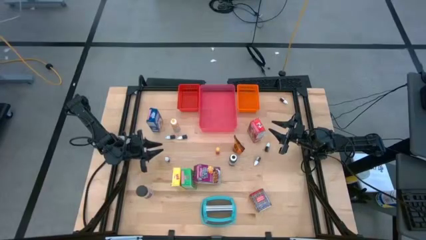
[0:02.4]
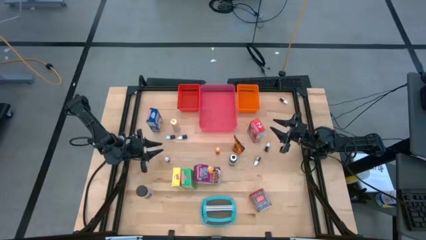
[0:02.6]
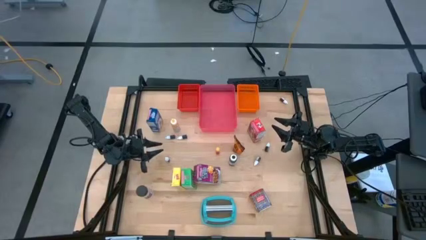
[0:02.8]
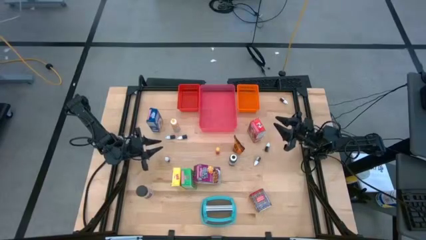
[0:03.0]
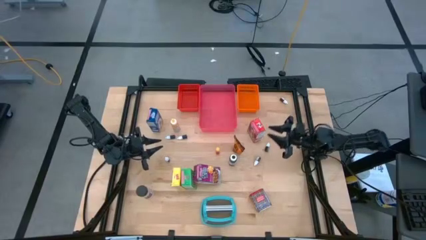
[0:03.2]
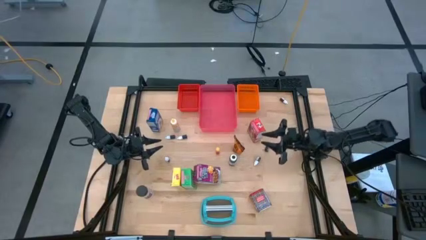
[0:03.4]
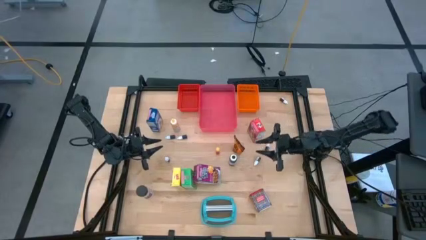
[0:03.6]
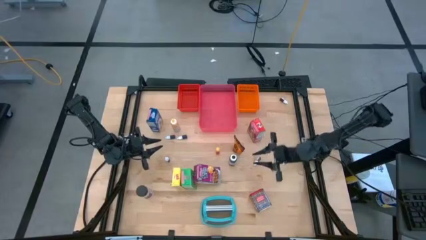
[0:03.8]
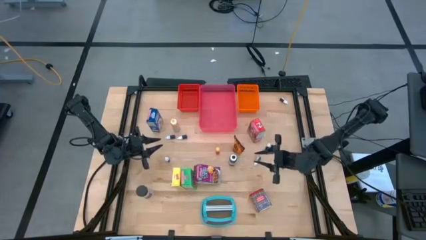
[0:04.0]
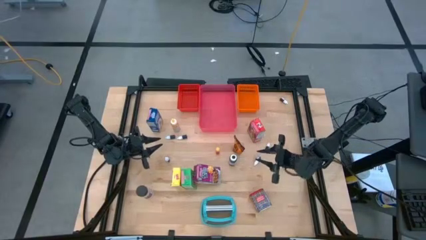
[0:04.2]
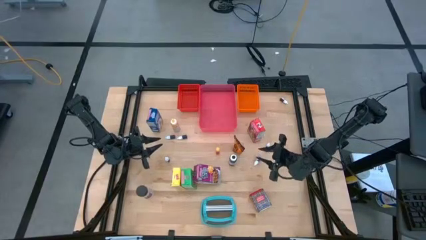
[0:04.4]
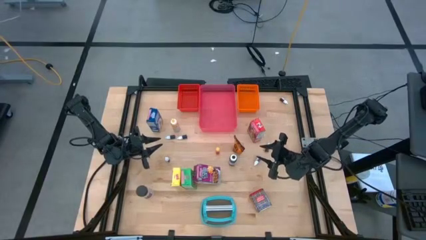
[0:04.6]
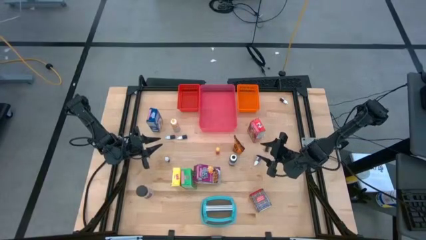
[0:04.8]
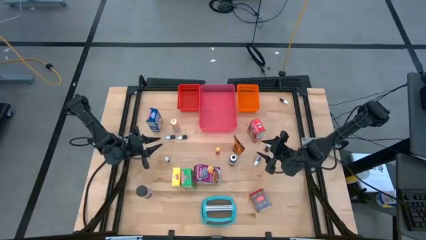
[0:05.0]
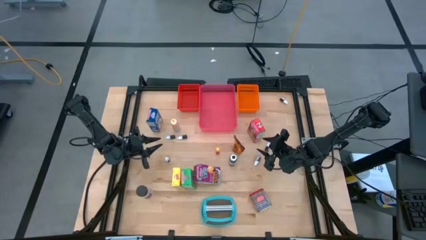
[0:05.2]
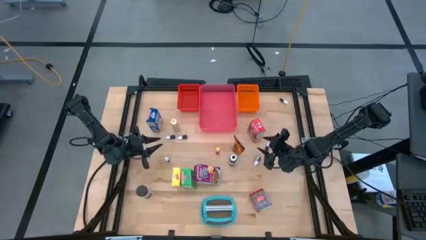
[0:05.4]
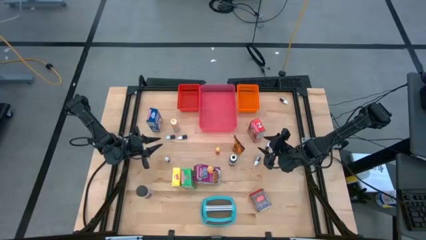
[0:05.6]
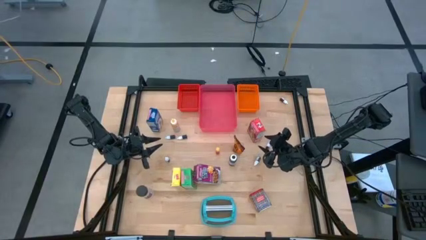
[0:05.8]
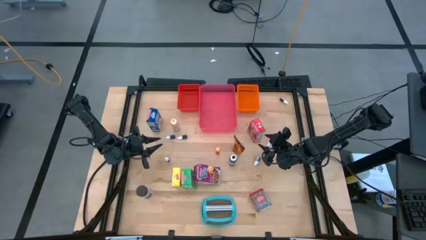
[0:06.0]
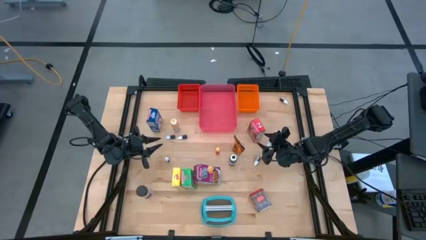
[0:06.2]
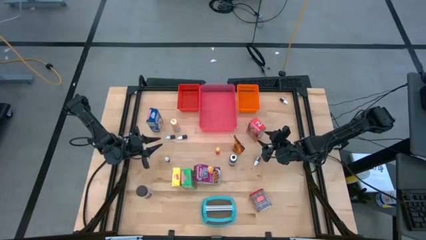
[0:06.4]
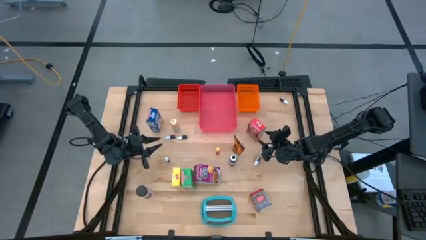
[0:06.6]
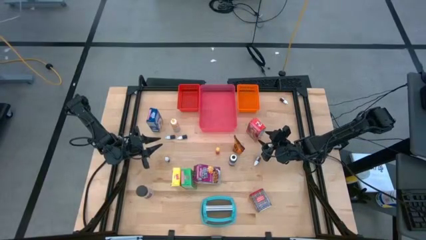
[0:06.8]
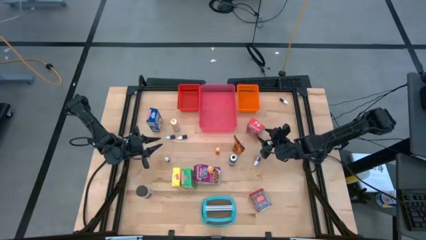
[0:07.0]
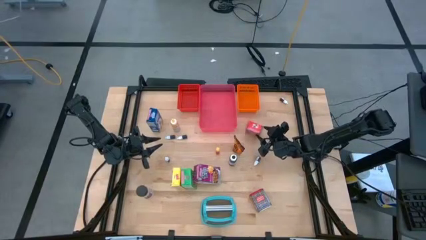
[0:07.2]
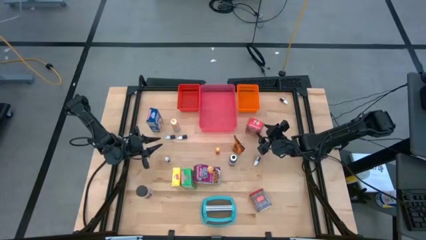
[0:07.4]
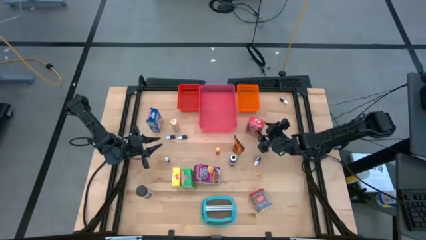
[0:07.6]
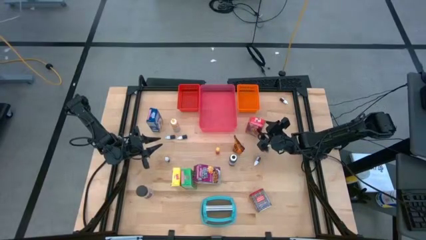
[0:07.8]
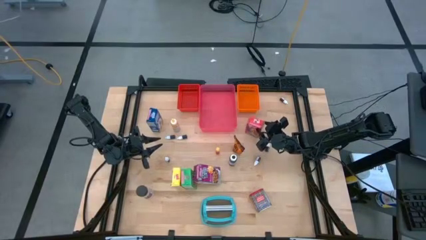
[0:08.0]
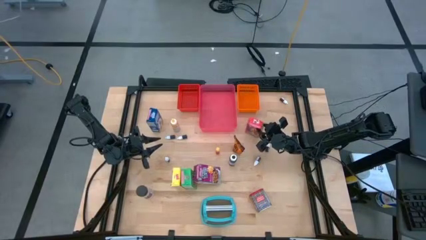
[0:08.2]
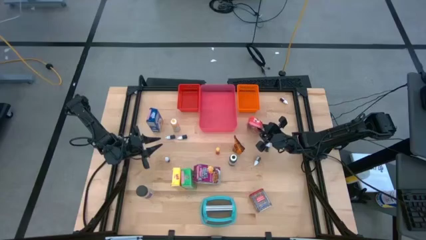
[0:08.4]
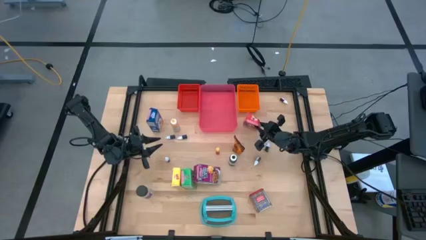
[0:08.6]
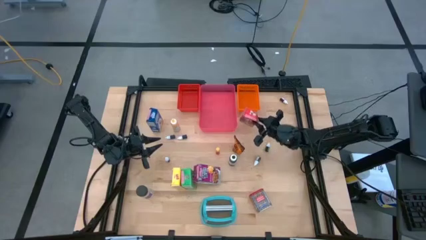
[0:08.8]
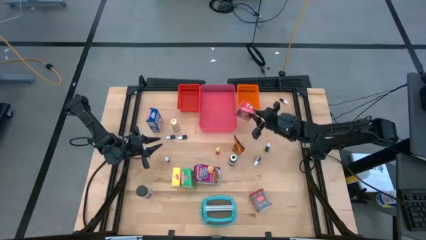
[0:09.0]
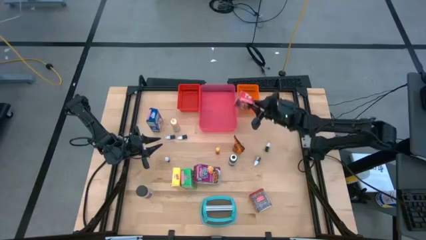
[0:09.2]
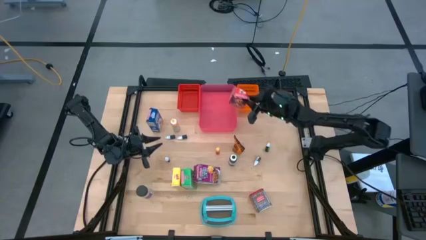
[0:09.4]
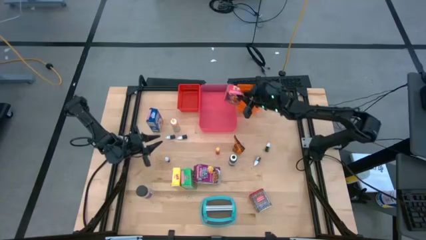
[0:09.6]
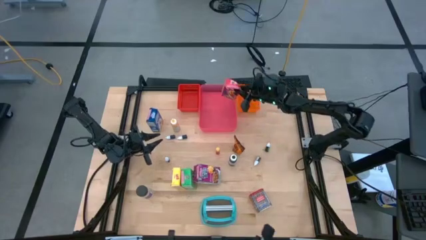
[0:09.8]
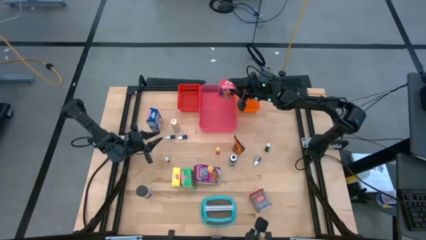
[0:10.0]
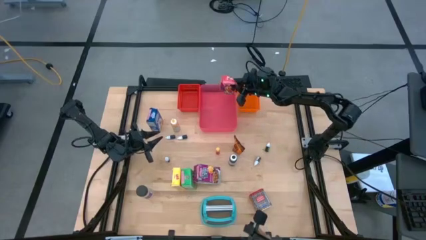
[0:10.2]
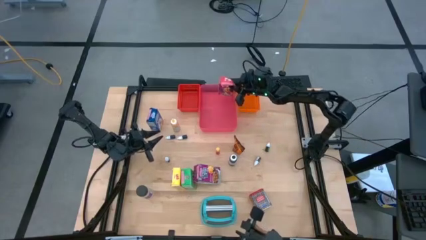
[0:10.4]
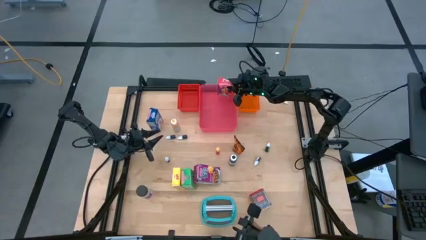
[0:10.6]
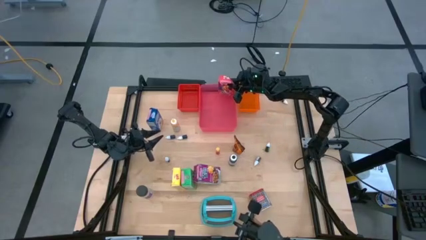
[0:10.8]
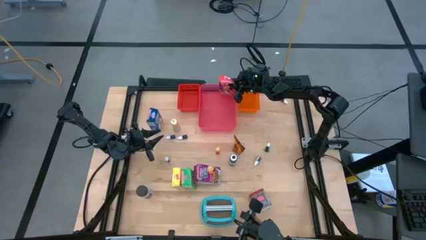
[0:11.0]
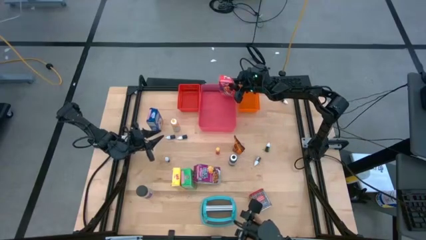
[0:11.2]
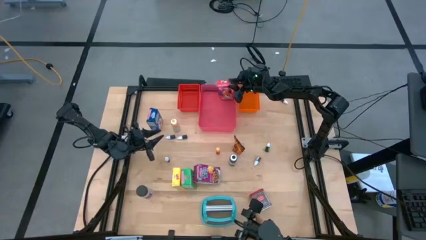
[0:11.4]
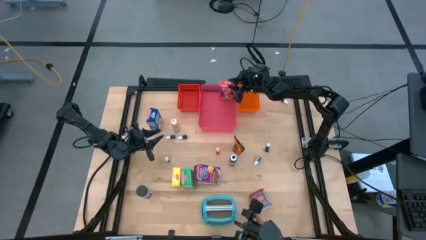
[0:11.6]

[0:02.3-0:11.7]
Task: Pick & Place Kitchen Items
Put the red cereal box into the pink bin

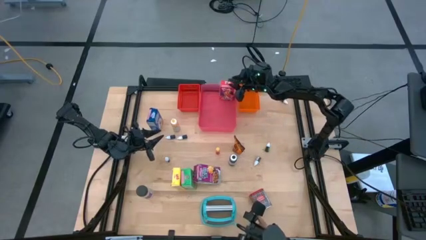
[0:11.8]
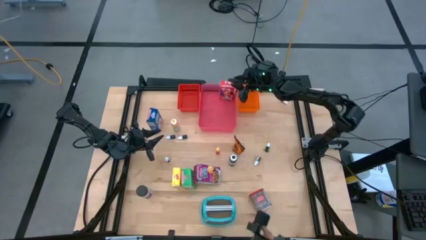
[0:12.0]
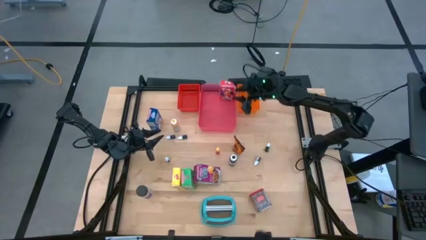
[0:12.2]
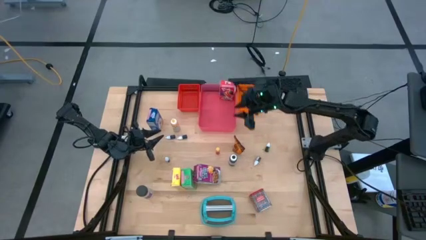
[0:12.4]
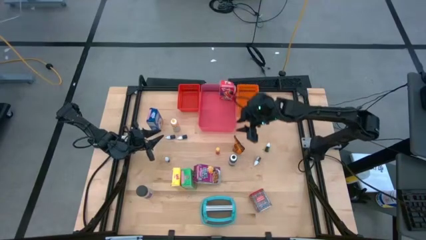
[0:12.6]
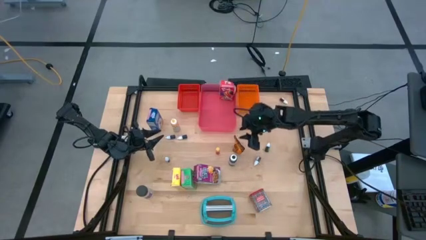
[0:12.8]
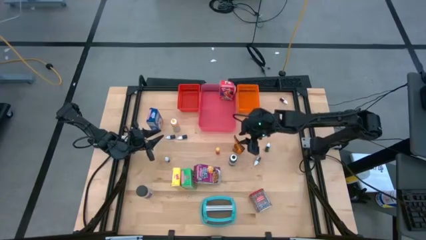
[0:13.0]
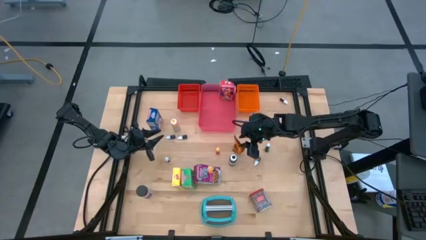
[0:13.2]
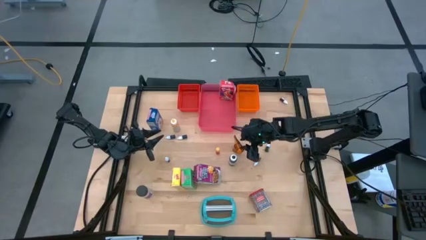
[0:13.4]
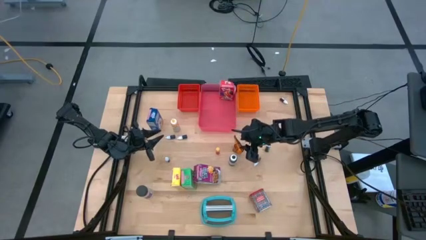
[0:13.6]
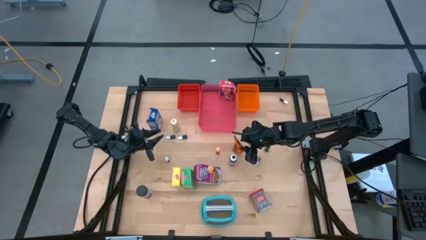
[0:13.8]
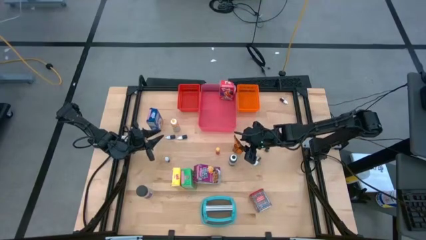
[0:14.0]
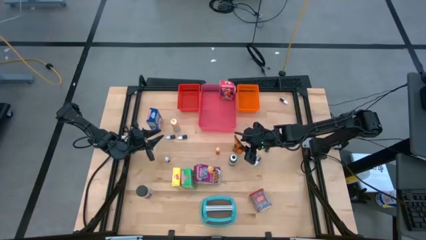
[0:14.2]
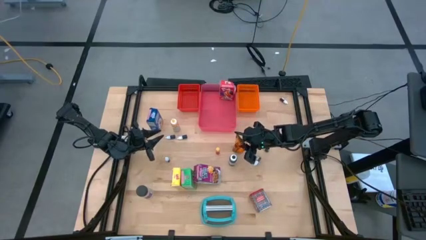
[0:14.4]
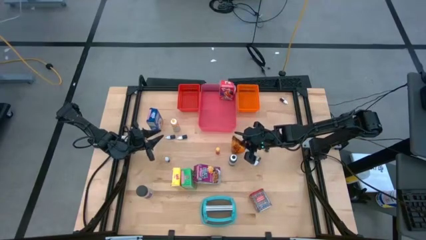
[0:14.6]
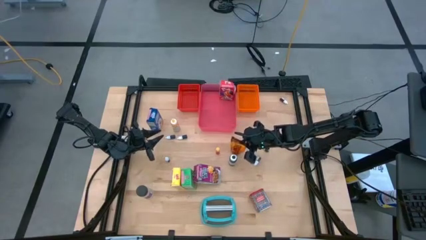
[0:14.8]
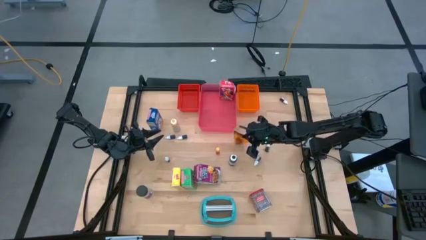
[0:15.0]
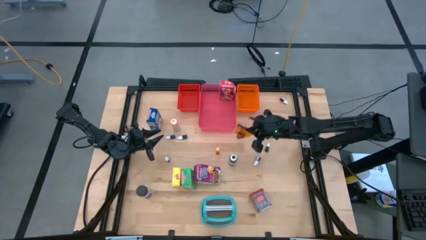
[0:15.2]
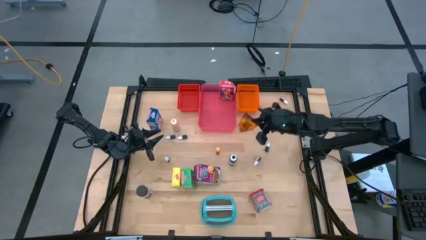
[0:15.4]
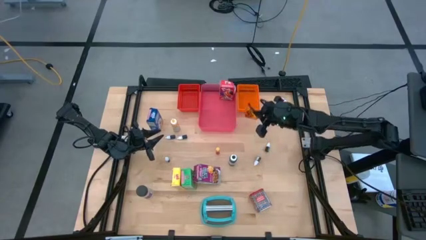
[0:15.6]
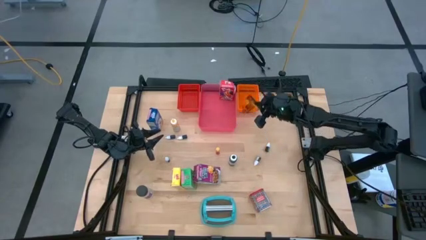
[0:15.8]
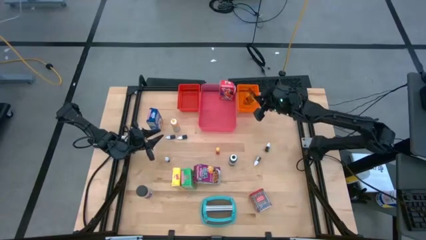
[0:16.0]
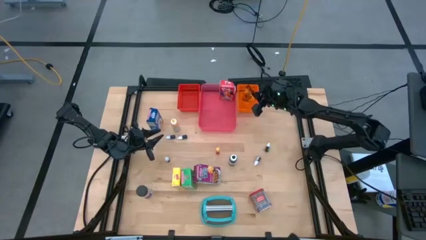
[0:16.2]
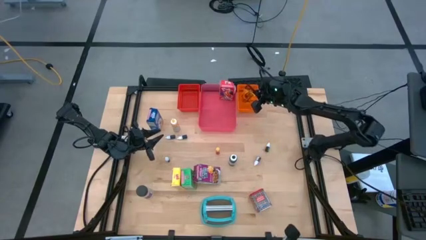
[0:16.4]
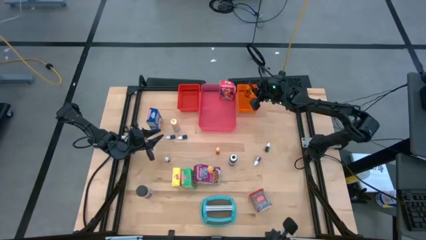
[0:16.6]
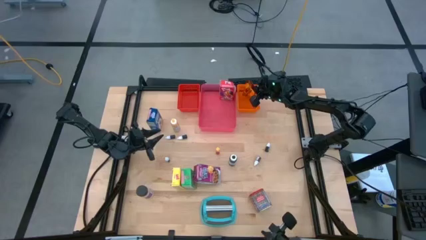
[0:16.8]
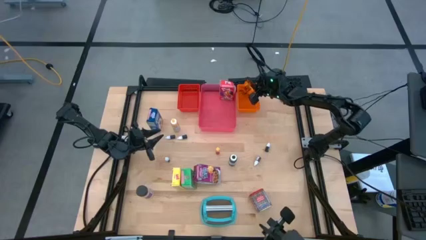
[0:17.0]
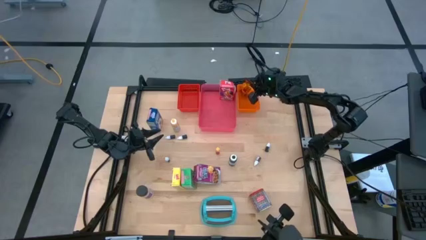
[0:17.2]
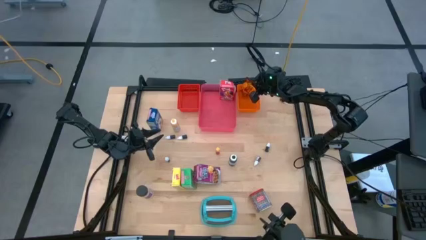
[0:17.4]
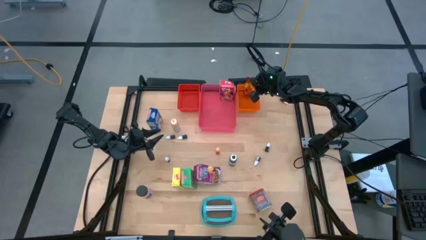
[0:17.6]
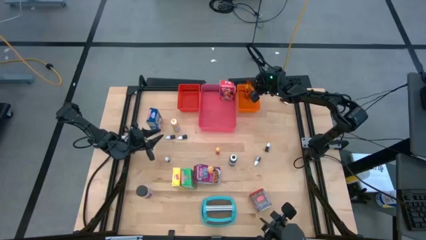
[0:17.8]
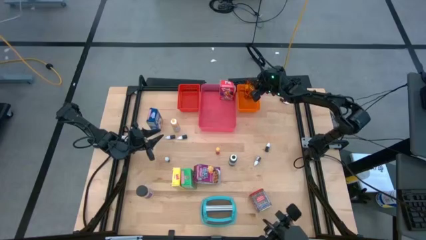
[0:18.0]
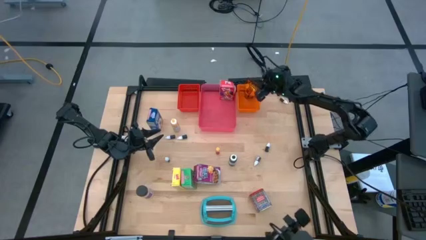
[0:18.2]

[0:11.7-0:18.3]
Put the orange seasoning pack into the orange bin
